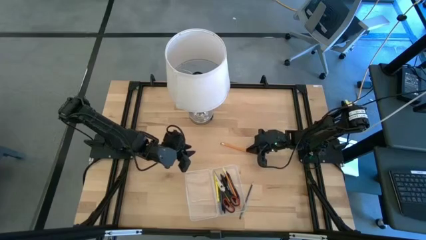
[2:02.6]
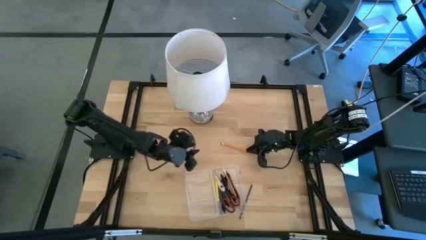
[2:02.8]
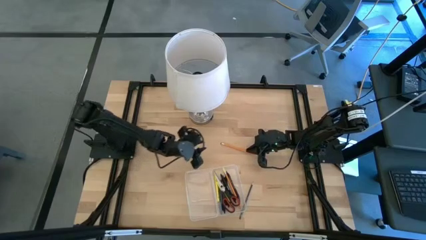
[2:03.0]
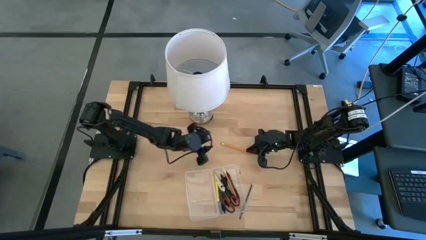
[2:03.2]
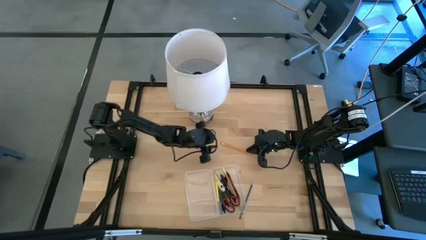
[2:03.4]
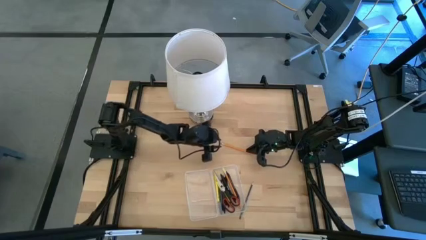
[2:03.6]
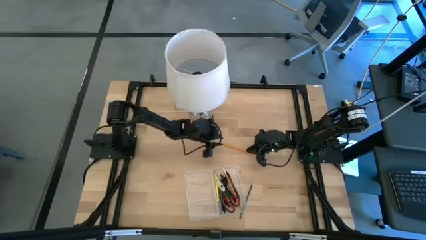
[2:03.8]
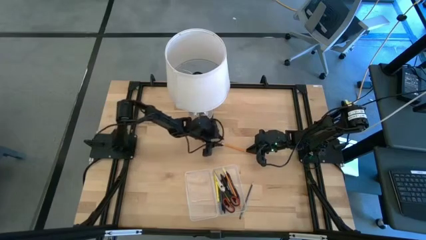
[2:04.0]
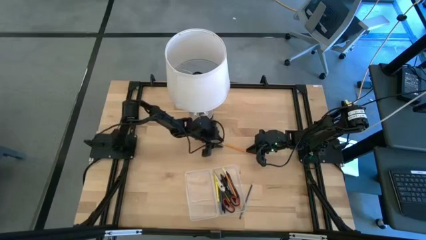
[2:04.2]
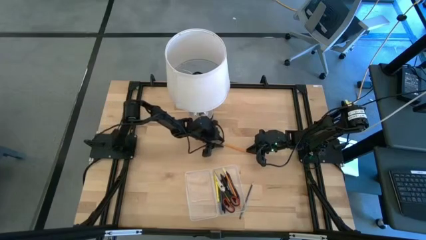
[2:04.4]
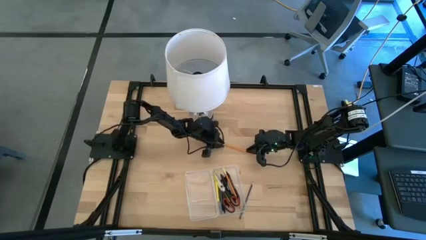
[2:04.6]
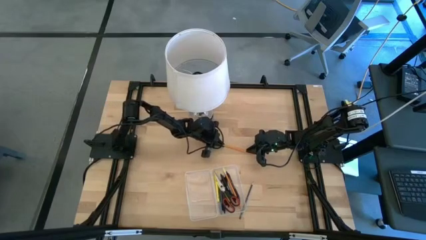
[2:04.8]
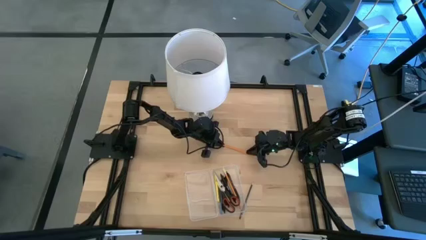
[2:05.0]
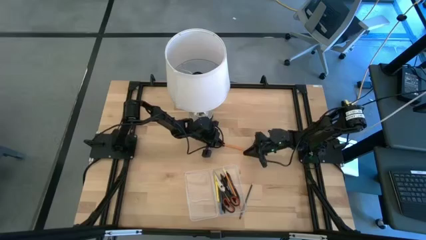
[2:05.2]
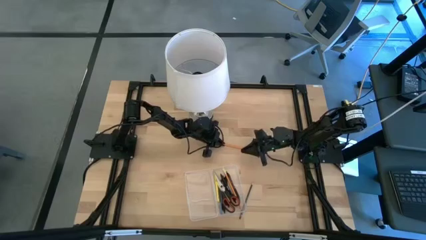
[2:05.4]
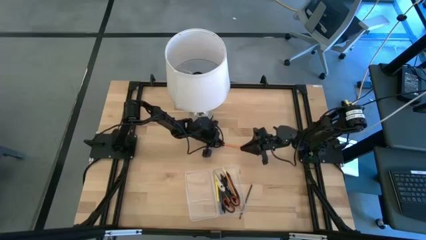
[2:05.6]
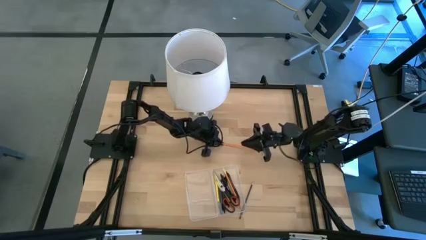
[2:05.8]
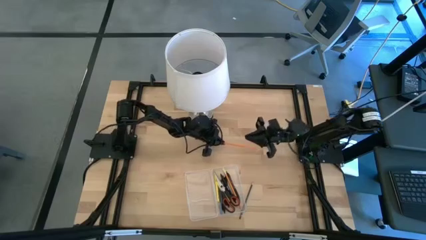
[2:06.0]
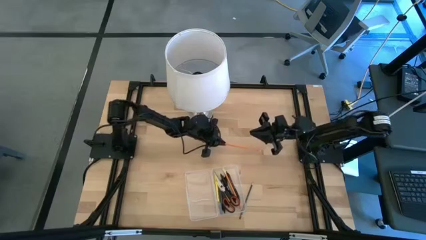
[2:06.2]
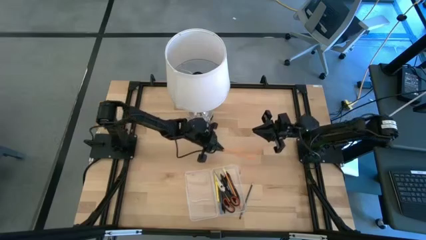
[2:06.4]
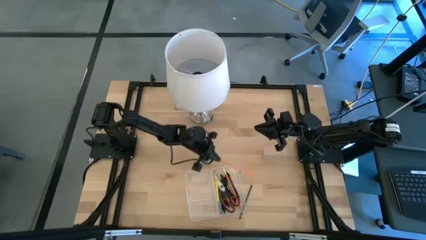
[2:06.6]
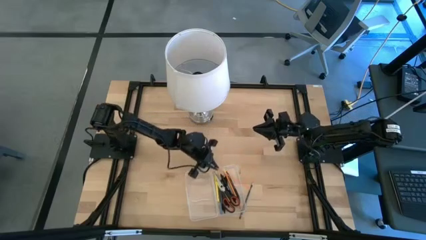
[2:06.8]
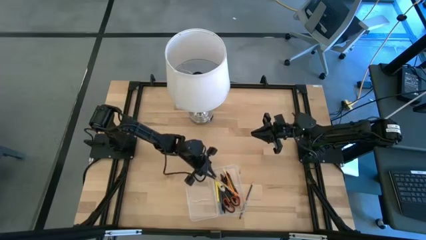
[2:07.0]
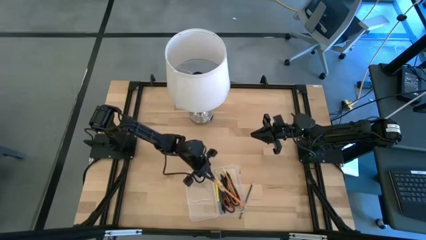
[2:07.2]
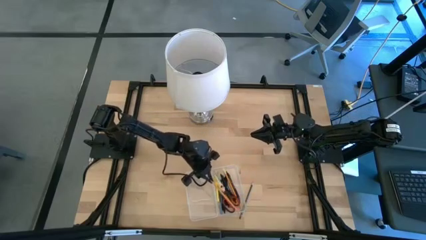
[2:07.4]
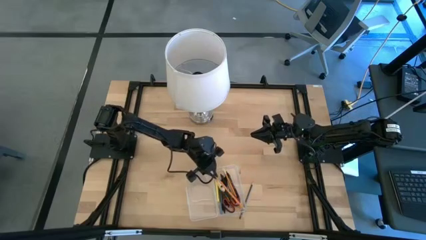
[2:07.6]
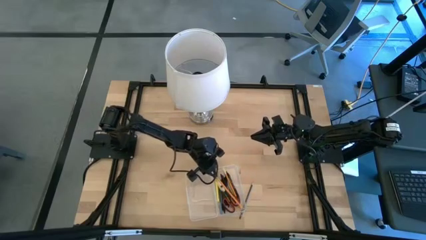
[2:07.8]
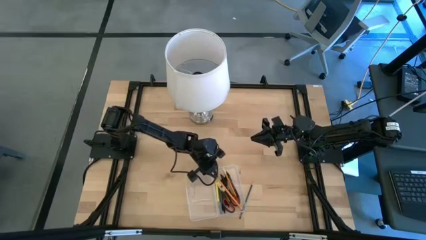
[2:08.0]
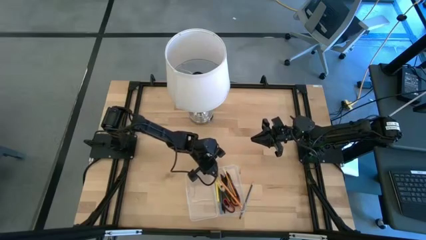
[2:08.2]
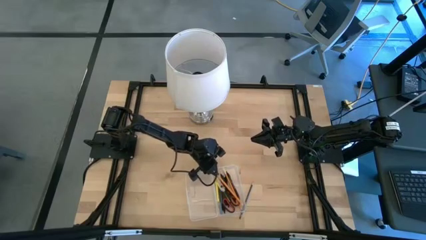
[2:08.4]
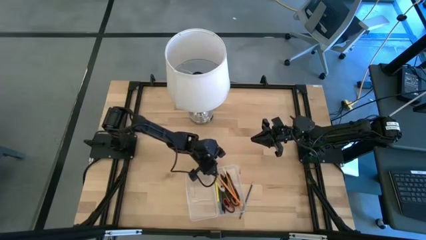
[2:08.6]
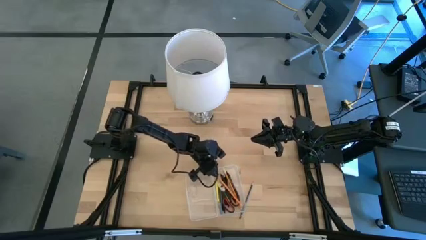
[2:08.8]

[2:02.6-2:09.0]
Task: Pick & place school supplies into a supply box
Put the orange pencil into the transparent supply box

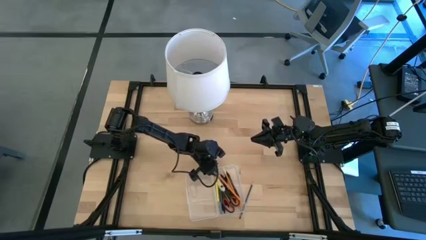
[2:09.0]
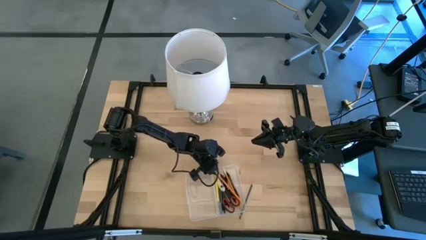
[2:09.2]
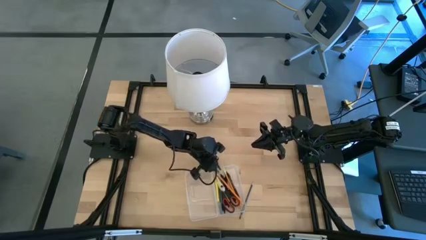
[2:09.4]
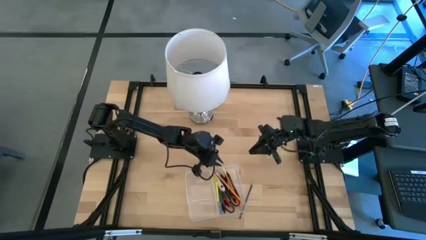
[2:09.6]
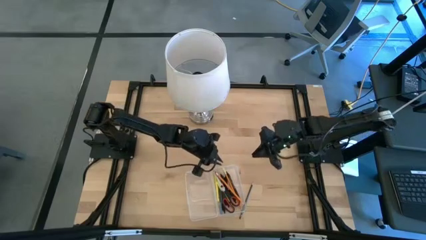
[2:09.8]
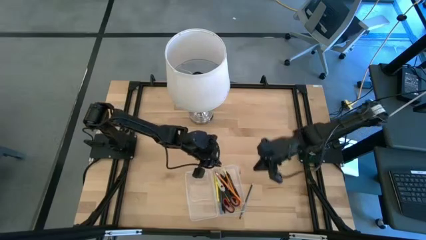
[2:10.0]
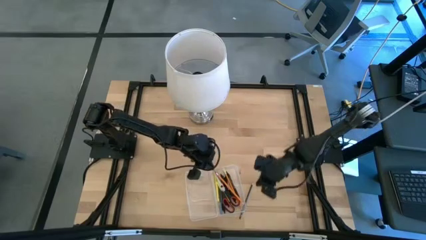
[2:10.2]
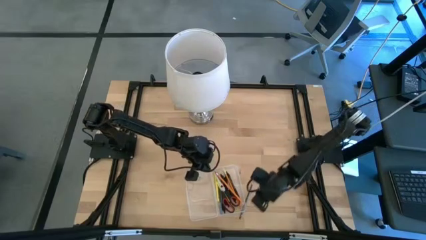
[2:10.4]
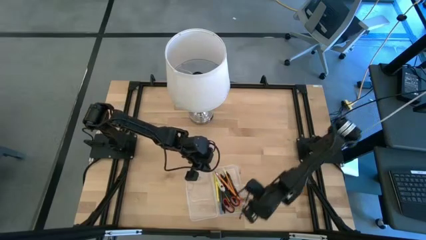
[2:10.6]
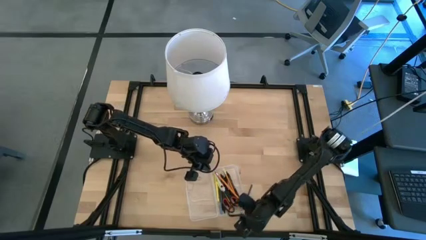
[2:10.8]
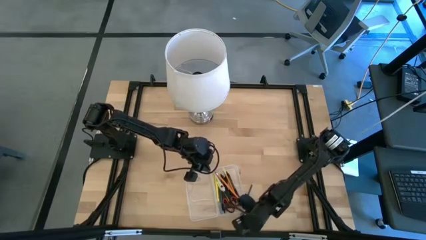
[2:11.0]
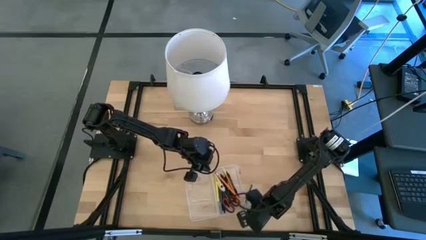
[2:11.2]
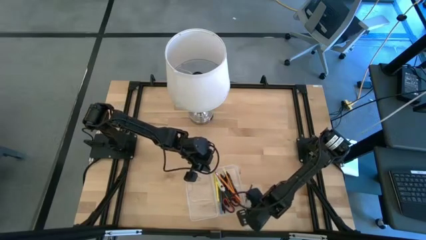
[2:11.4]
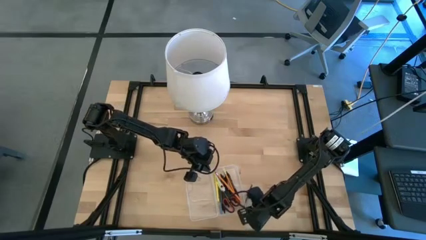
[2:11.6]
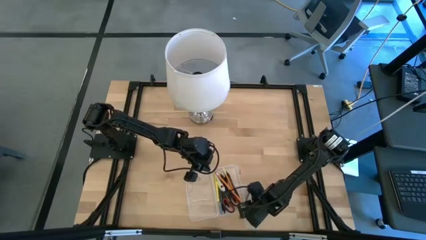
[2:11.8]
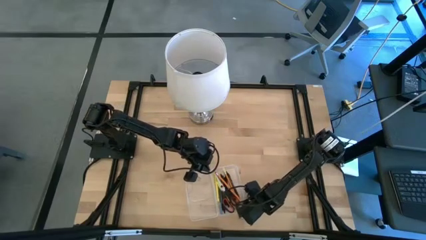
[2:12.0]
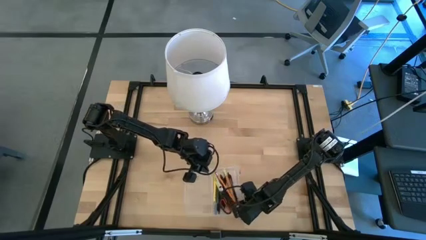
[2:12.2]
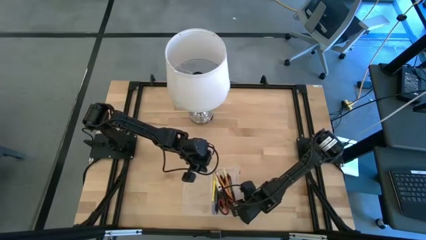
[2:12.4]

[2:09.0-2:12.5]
Adjust the transparent supply box on the table

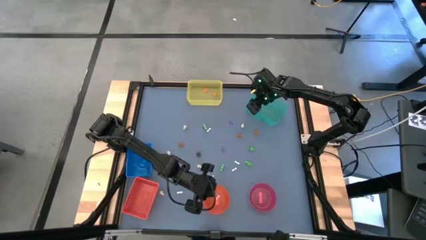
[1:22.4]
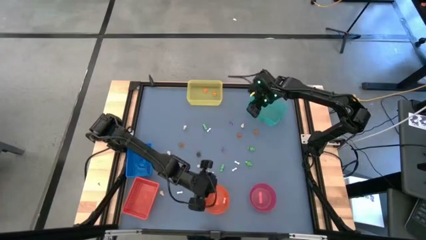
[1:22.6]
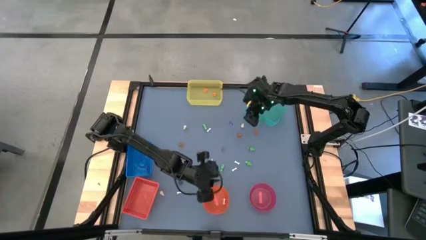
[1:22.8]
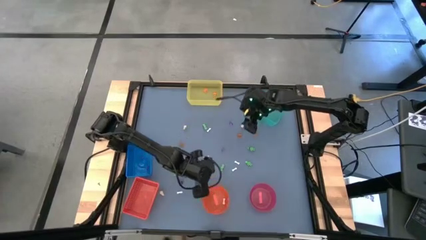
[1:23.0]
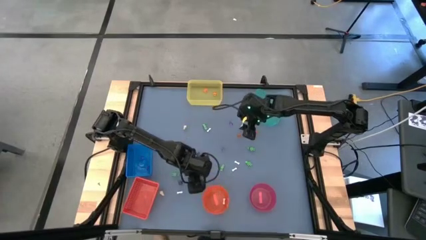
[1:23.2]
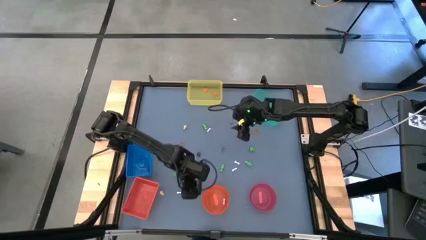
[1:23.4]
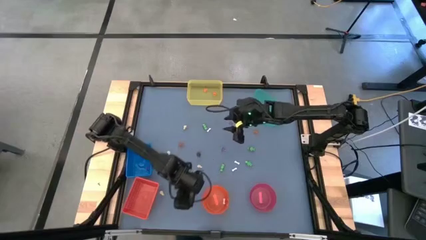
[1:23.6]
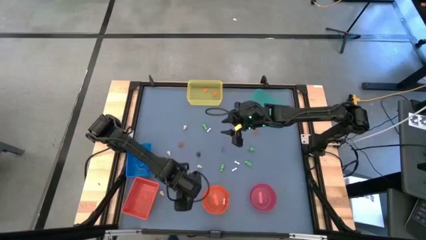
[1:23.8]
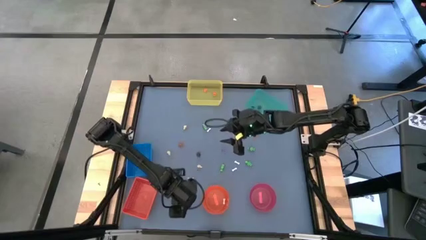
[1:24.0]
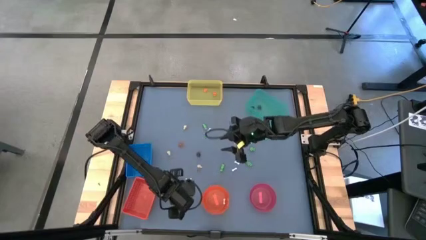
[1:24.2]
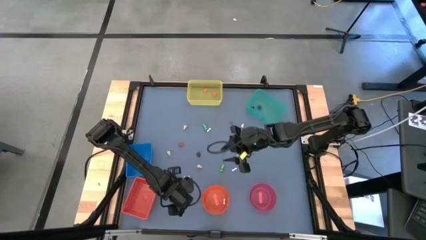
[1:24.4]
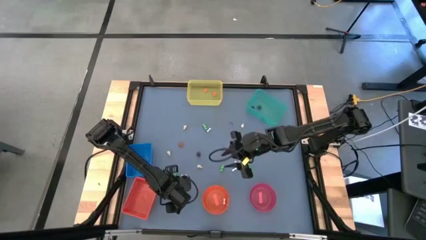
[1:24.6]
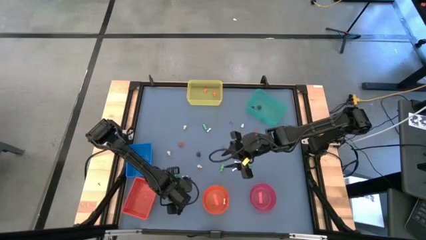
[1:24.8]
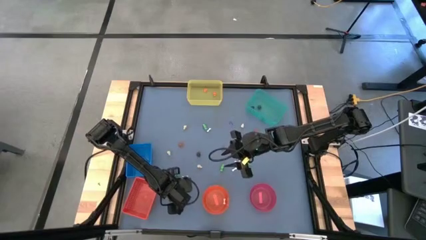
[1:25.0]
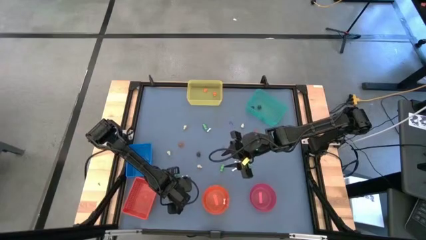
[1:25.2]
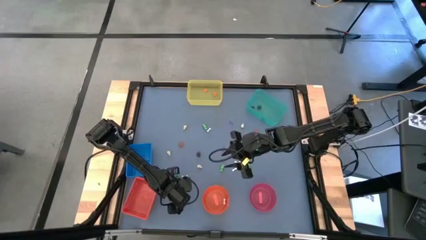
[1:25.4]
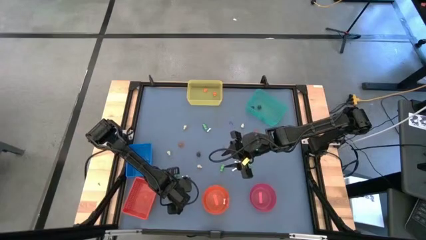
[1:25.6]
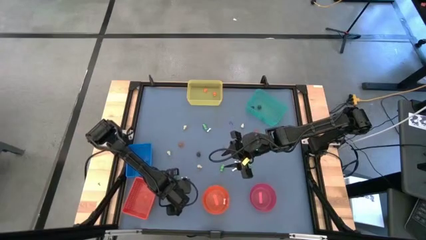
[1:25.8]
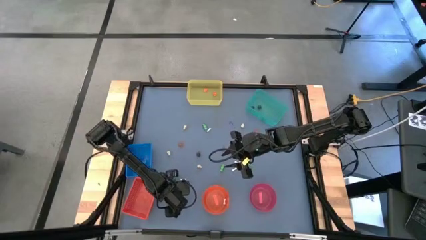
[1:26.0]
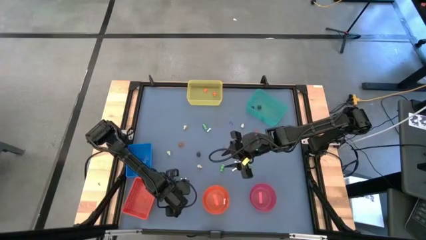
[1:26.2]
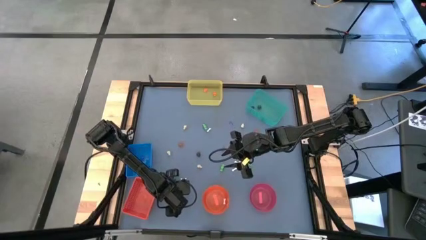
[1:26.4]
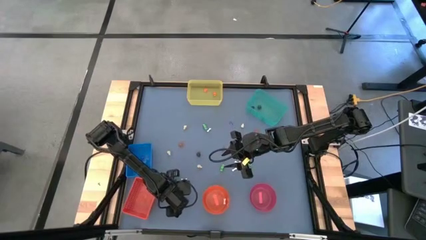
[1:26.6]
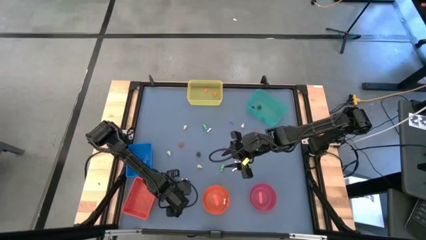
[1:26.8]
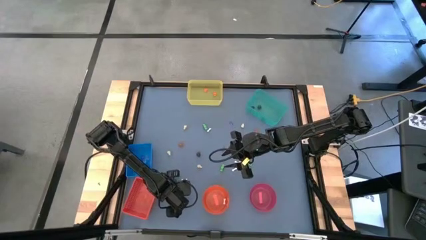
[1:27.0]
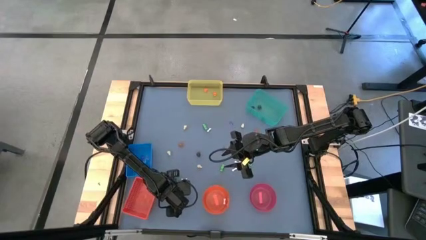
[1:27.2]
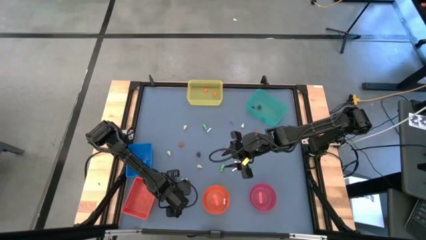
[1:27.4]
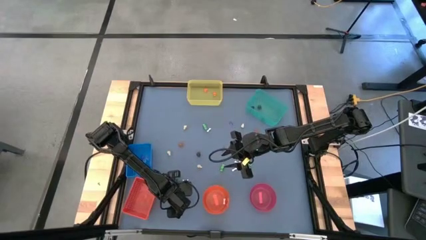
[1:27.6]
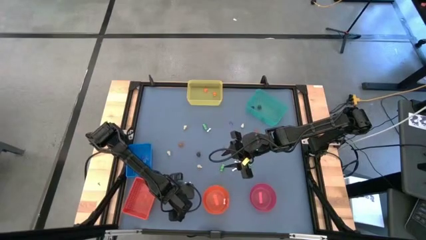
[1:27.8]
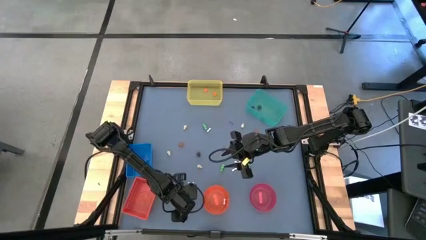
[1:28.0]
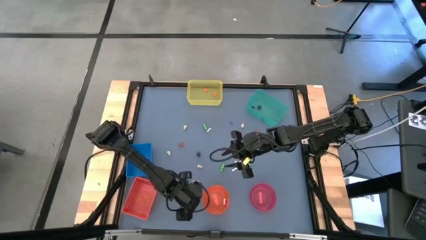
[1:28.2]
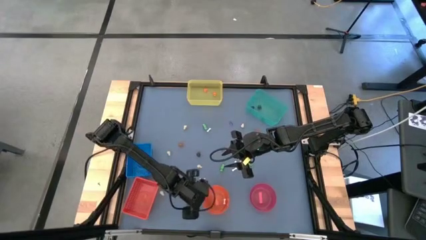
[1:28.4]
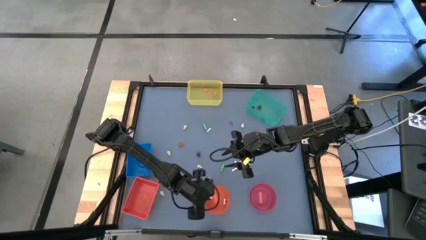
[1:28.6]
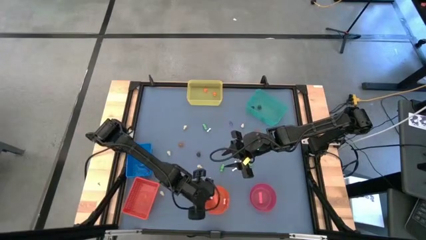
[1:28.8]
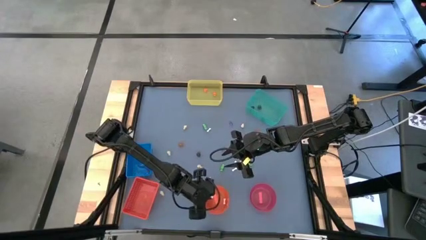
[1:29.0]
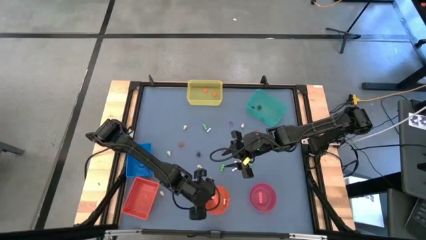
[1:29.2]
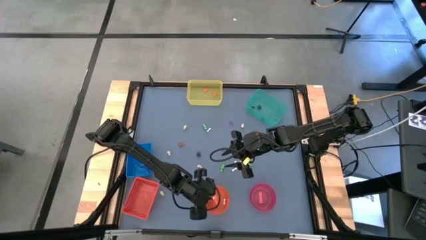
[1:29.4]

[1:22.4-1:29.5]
Task: Sort Halloween decoration
Put the white bone toy into the orange bowl
